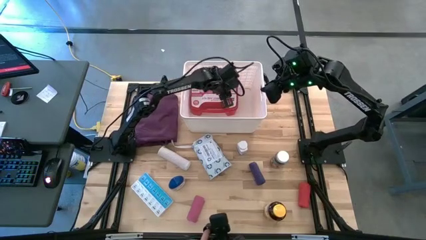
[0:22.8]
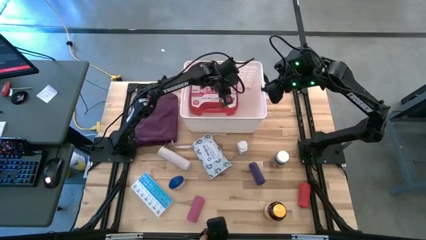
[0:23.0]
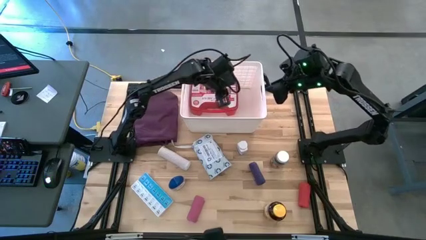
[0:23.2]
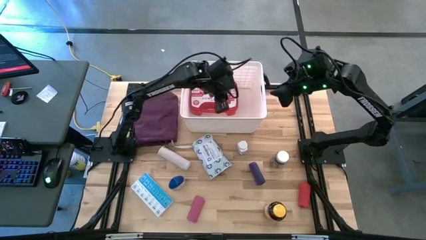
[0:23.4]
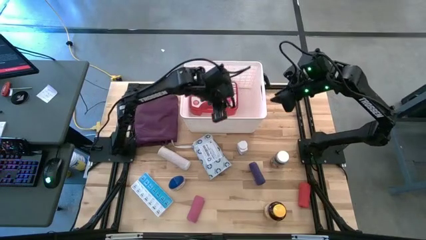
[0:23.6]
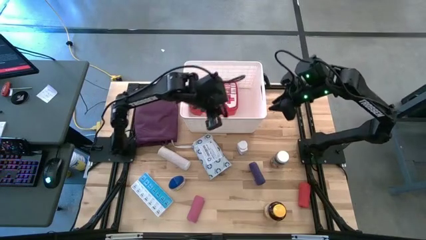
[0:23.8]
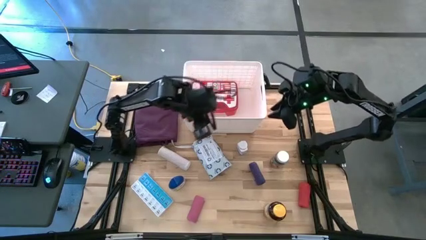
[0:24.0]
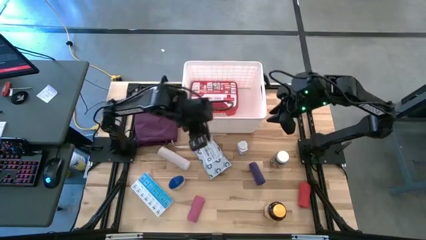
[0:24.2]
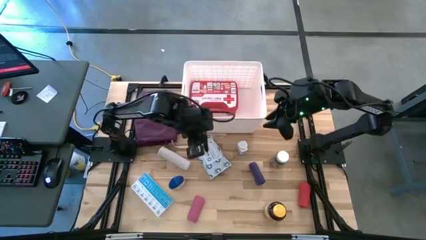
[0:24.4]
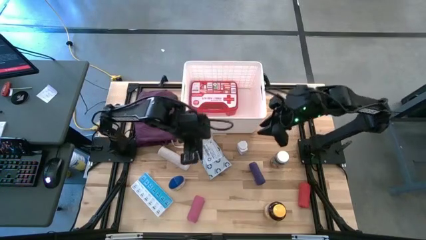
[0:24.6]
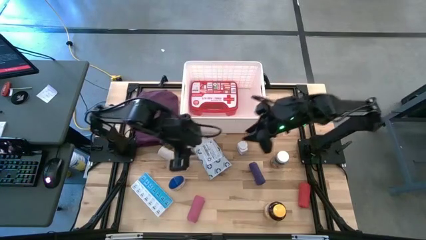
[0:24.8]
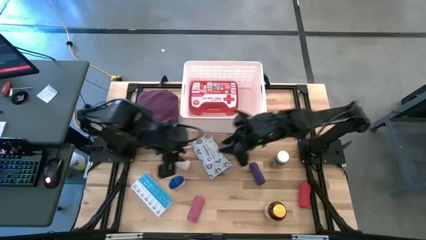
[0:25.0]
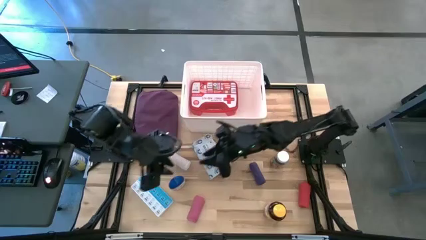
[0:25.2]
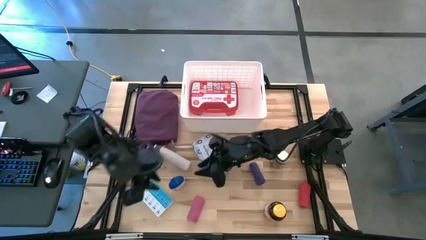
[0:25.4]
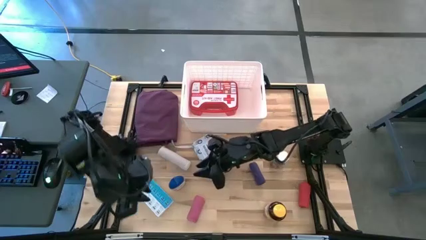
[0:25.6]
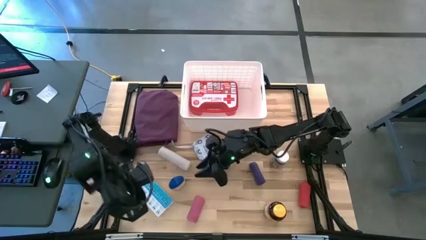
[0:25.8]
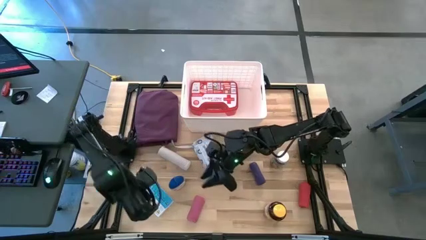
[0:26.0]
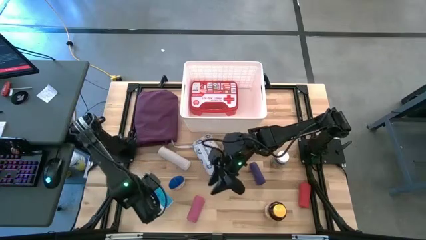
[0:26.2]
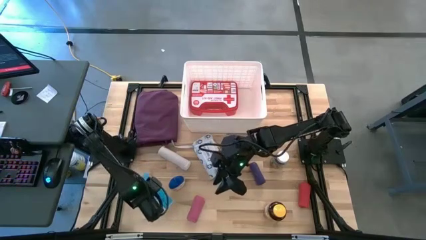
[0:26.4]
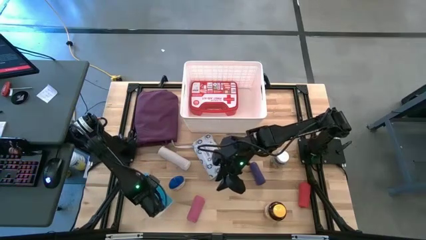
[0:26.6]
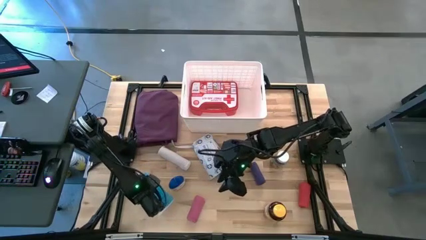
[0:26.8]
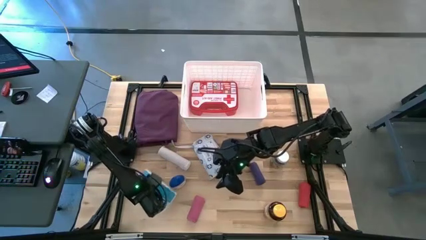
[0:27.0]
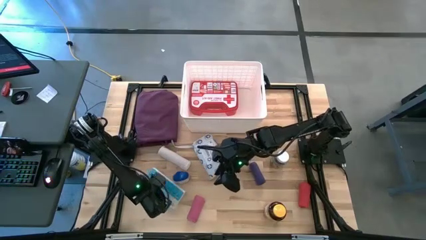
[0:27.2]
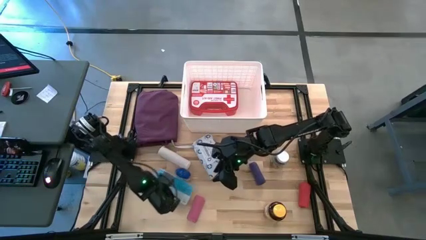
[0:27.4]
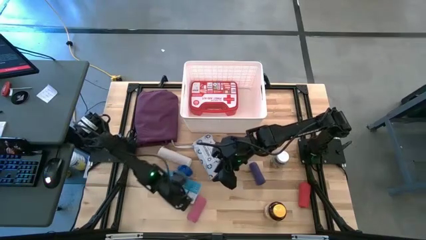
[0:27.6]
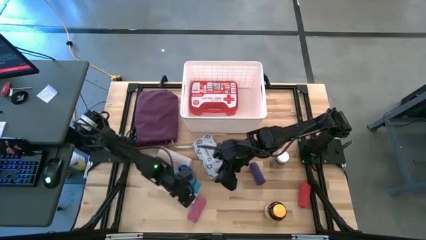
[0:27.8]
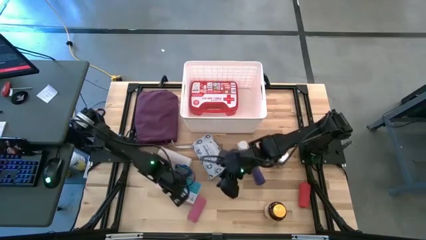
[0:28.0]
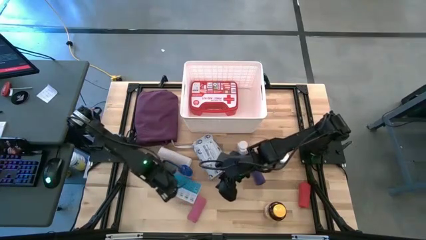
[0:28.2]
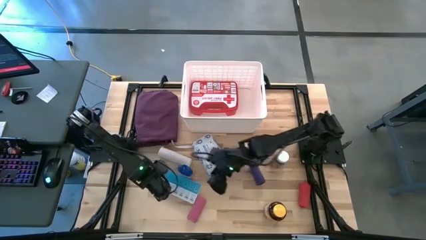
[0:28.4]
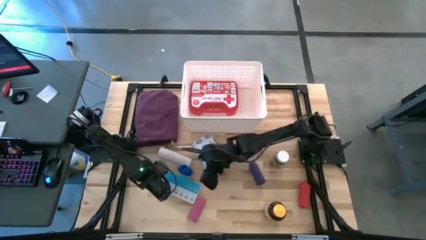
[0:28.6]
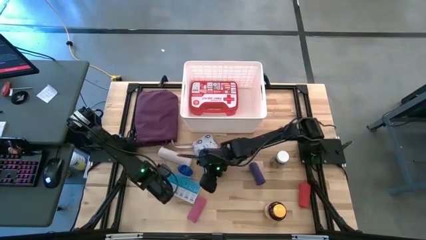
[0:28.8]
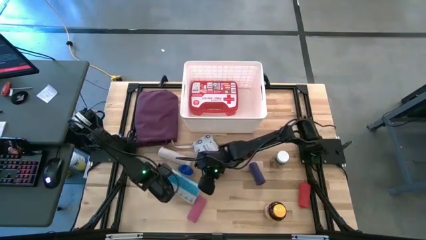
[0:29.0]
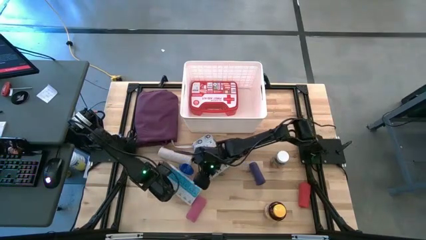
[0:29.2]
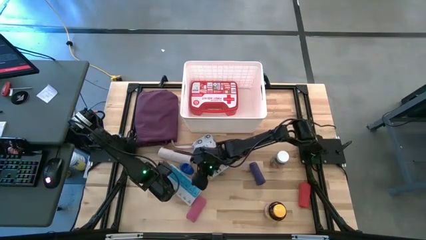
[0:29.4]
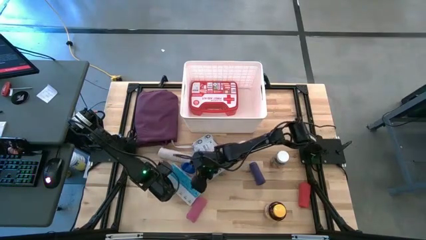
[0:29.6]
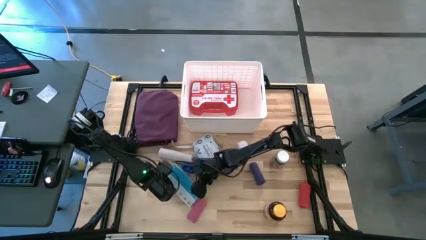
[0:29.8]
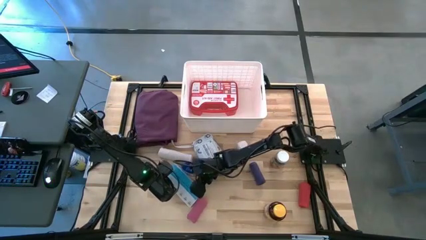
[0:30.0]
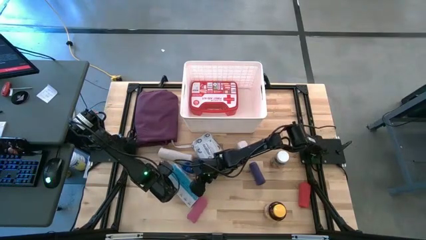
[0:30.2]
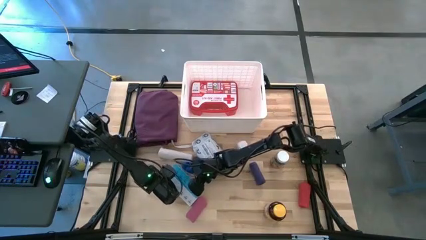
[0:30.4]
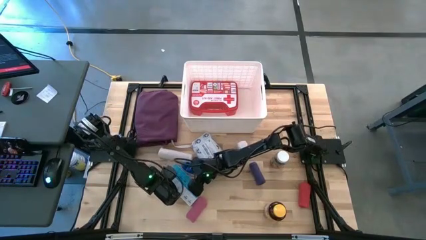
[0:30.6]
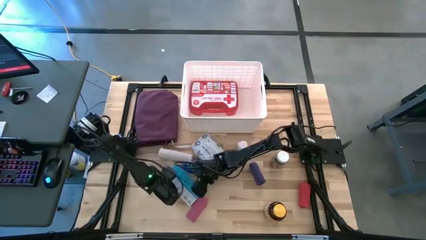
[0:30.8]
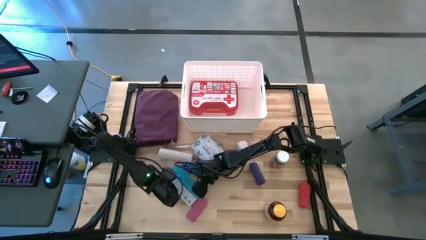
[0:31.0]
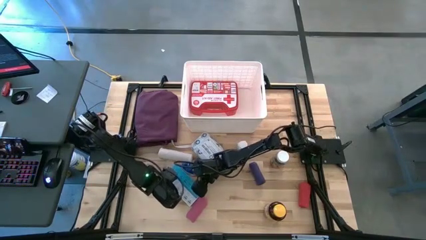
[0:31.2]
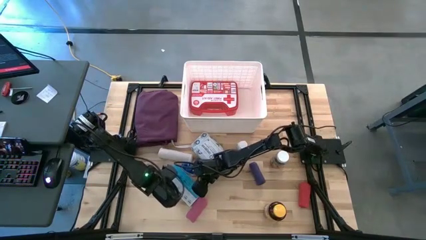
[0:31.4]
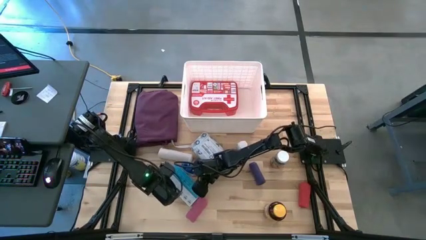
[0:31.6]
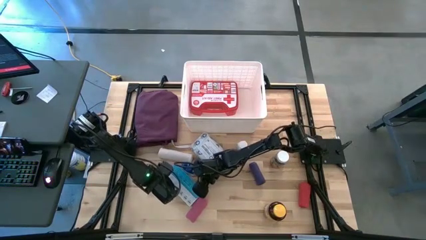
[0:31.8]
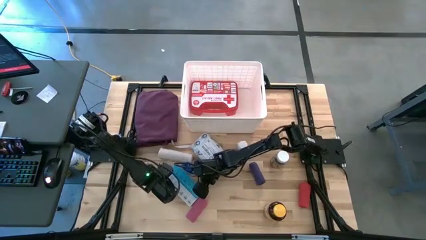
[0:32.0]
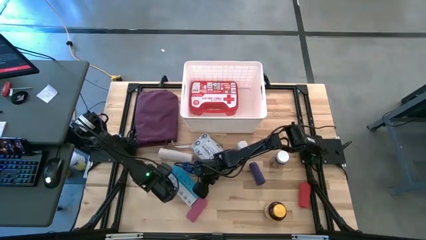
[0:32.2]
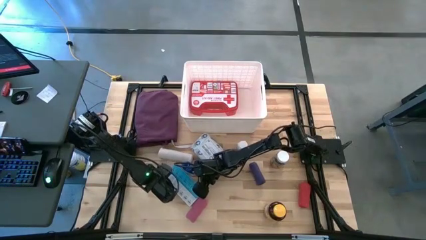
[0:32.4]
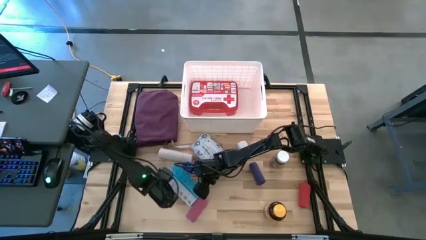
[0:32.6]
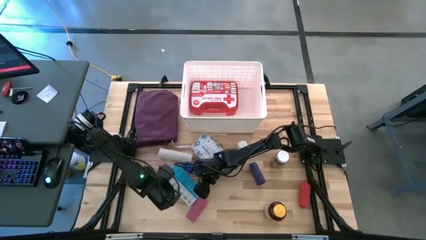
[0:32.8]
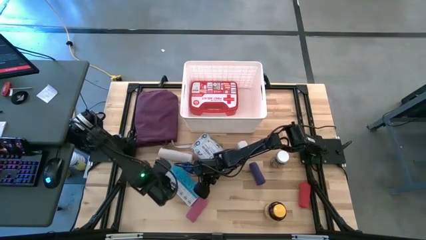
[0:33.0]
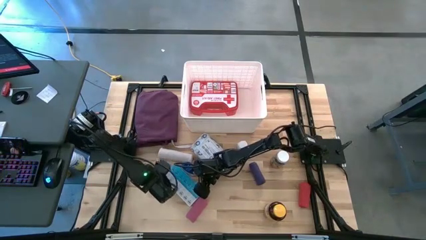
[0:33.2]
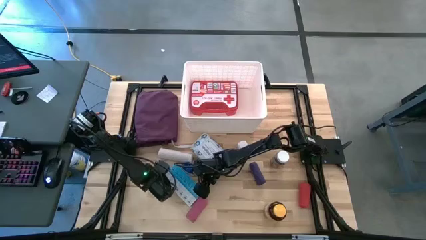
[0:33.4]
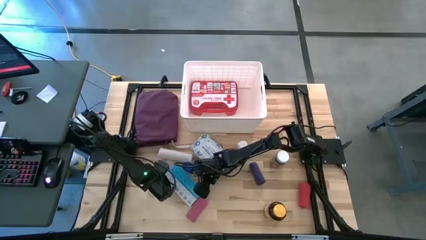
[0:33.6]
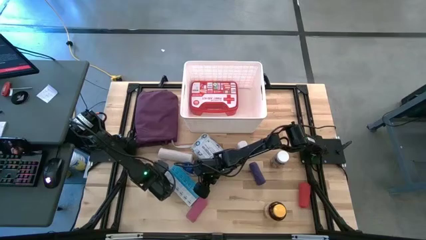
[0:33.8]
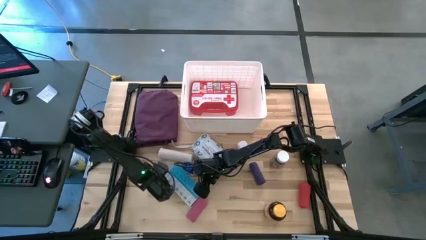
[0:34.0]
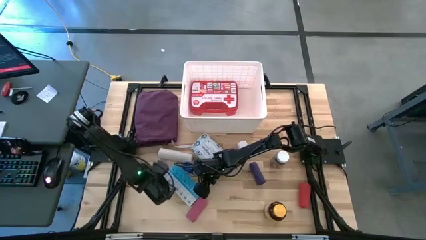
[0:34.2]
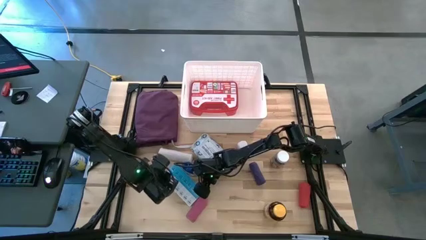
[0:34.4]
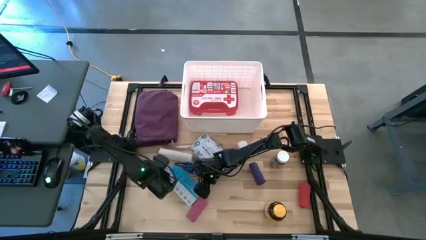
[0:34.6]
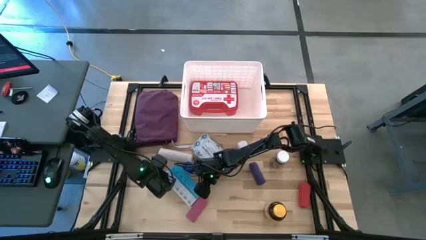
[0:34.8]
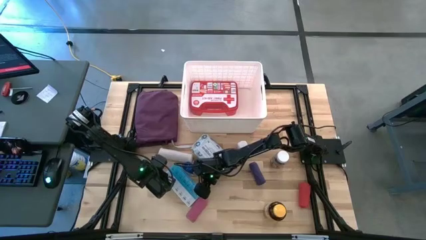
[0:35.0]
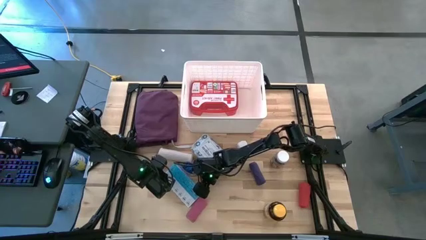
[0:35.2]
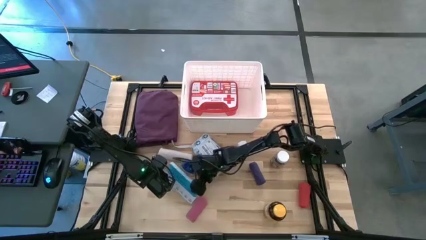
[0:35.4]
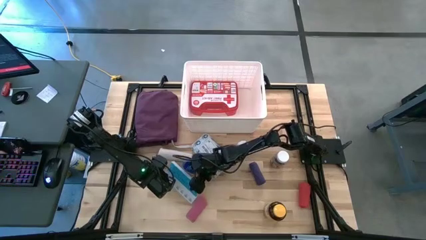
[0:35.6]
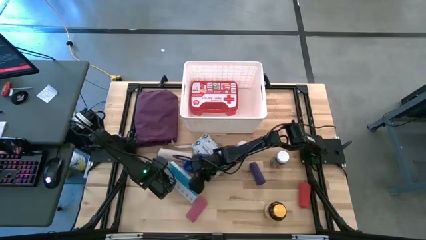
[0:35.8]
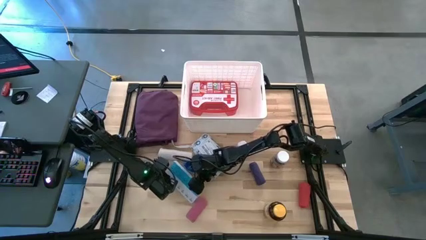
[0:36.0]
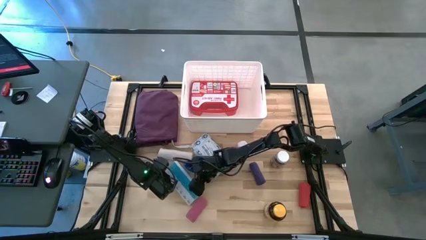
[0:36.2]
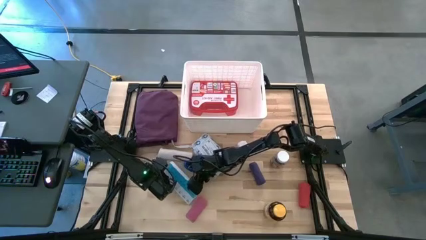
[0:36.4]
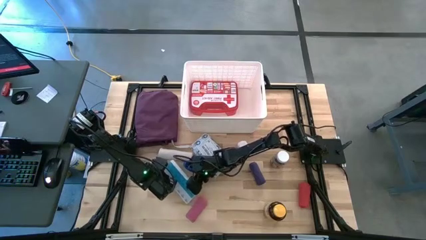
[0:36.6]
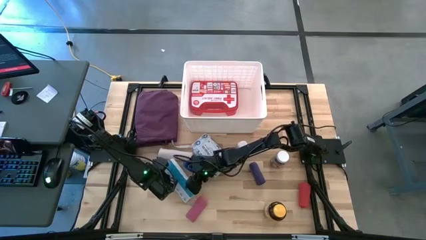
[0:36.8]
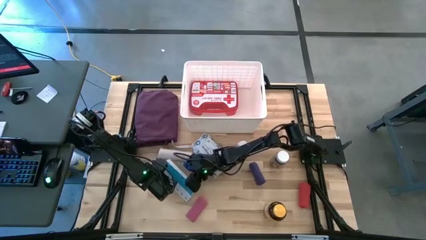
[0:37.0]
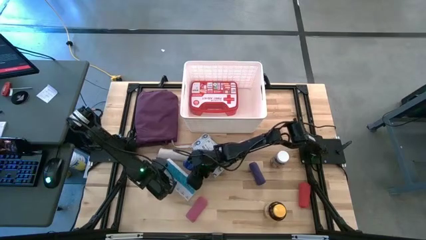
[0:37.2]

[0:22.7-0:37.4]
Task: Pick & place medical supplies in basket/bin
Put the white and blue pill organizer into the white bin
